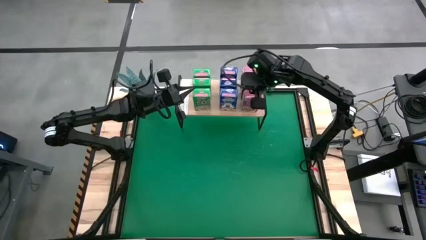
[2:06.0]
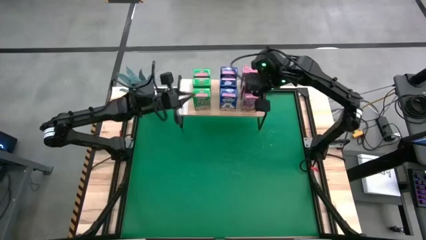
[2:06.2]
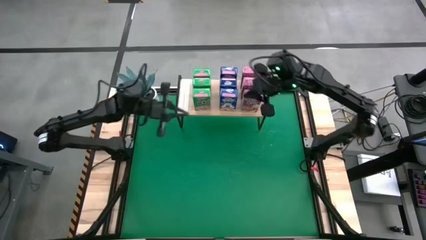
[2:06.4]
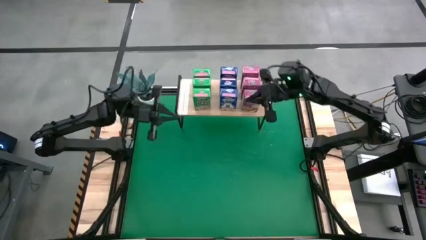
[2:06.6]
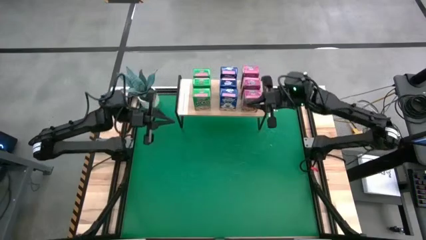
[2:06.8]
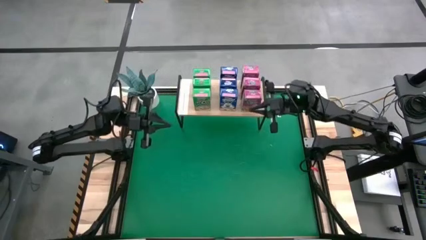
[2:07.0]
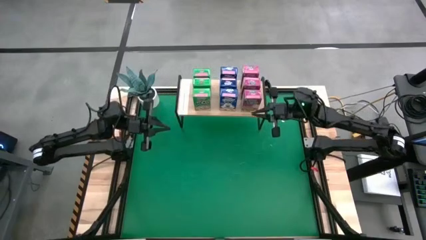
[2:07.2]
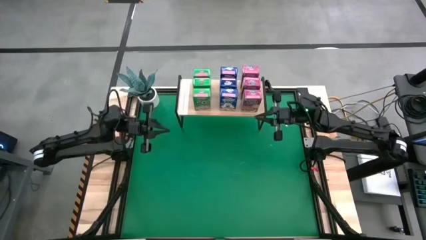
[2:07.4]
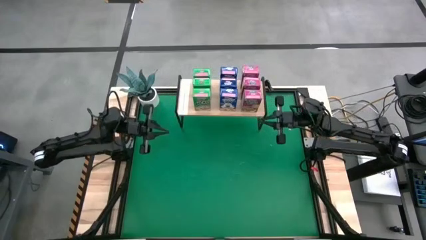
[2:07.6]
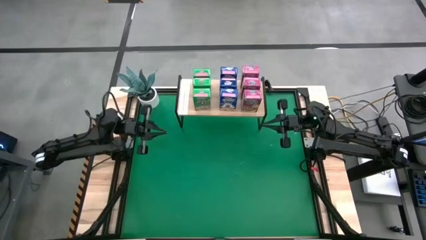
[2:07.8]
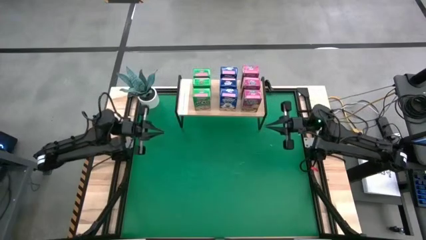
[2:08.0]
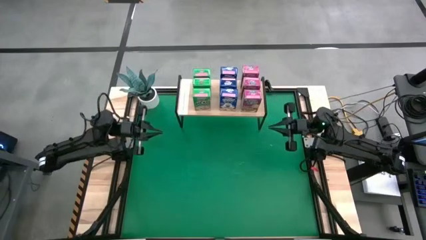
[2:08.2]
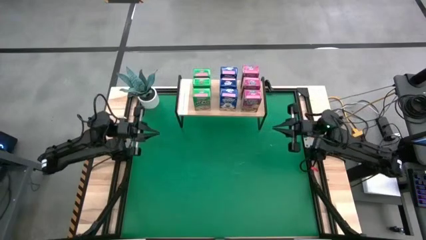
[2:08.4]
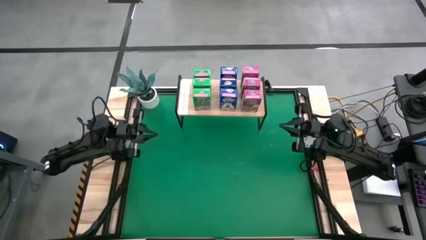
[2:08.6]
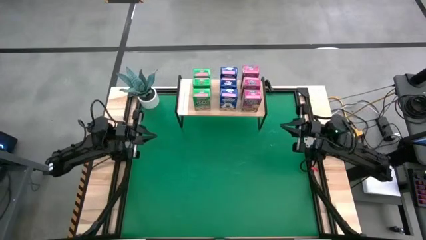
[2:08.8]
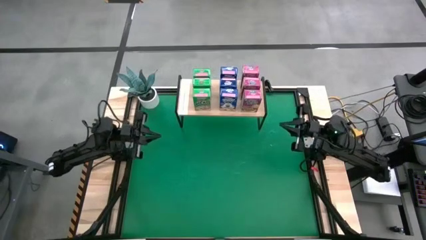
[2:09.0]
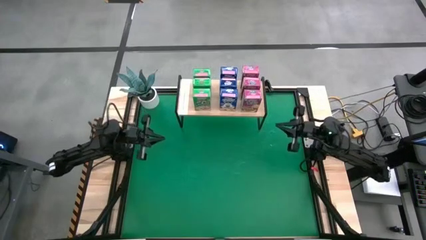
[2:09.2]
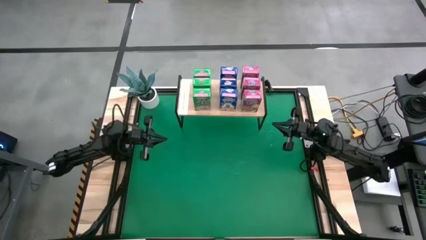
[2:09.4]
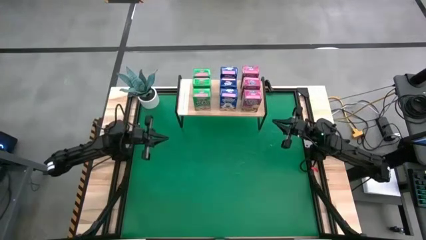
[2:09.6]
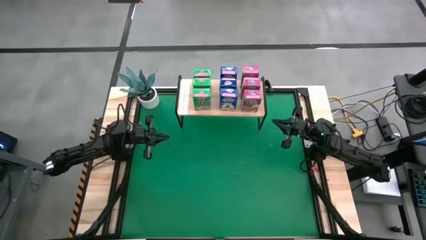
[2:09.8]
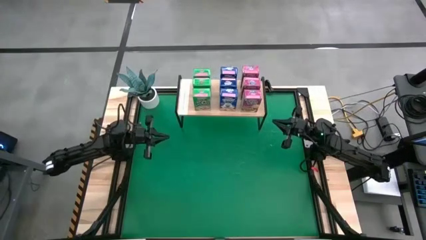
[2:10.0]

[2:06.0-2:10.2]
Task: Stack cereal on shelf
Return to Home Position

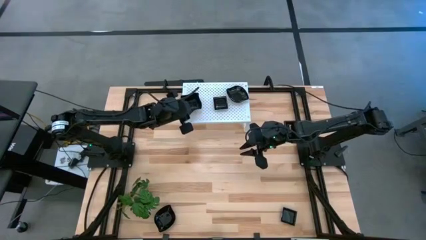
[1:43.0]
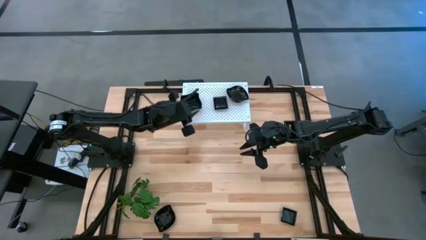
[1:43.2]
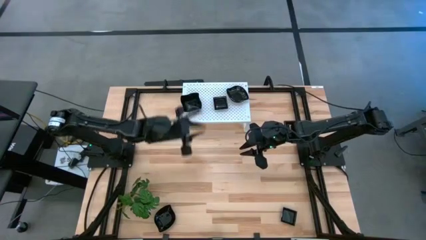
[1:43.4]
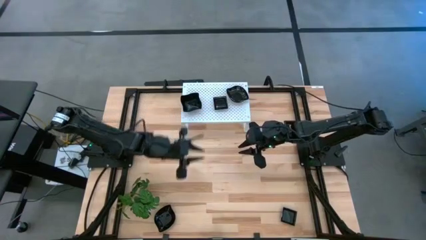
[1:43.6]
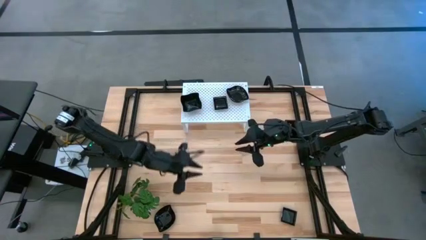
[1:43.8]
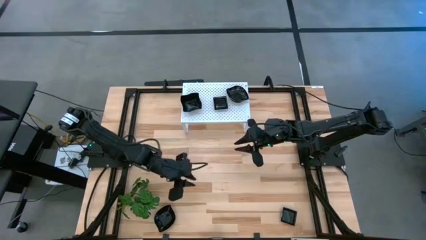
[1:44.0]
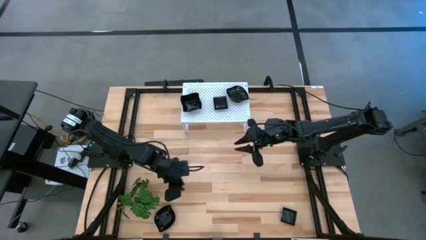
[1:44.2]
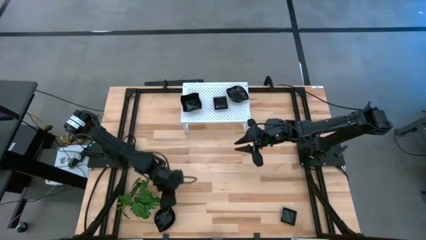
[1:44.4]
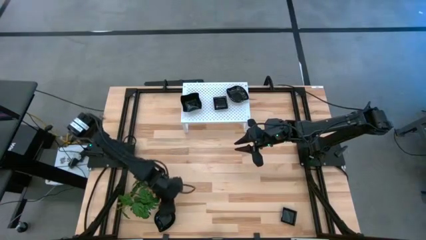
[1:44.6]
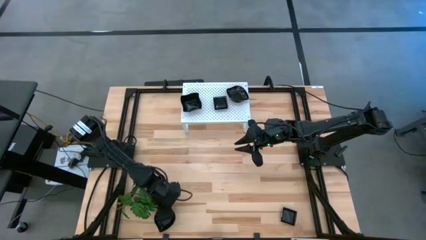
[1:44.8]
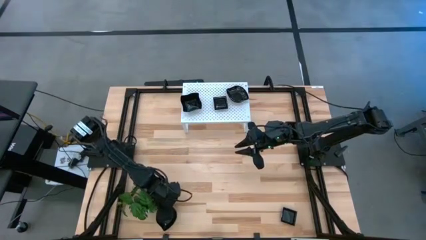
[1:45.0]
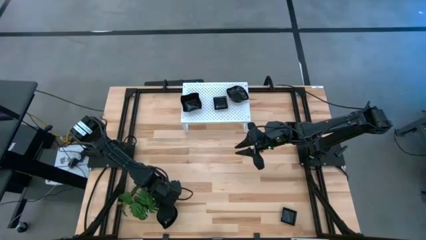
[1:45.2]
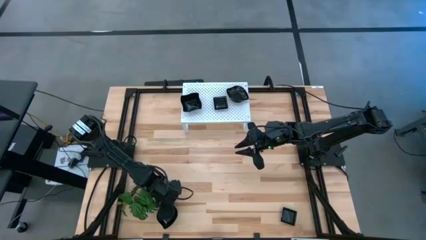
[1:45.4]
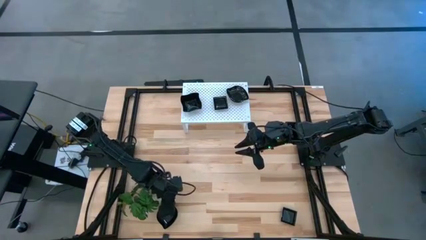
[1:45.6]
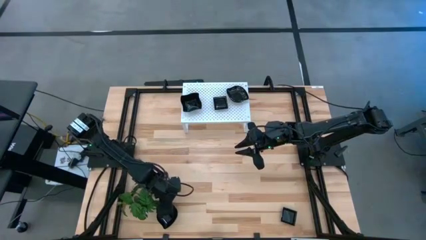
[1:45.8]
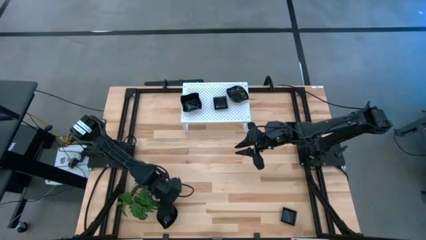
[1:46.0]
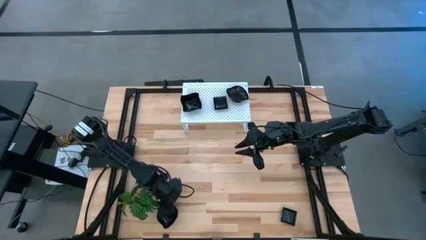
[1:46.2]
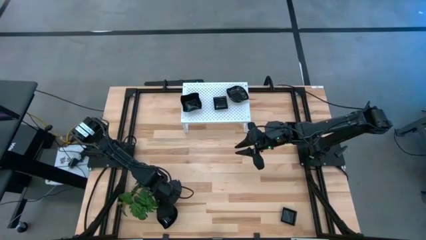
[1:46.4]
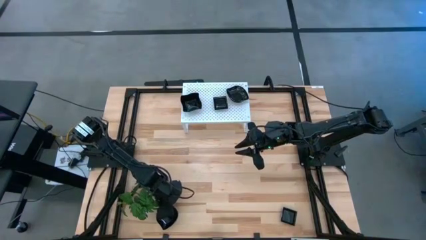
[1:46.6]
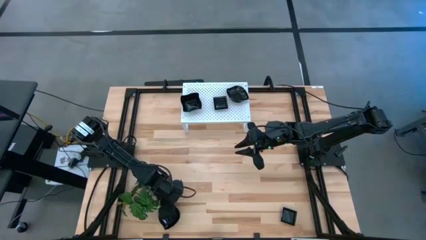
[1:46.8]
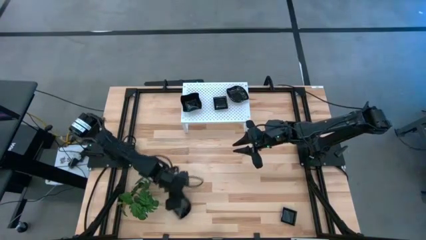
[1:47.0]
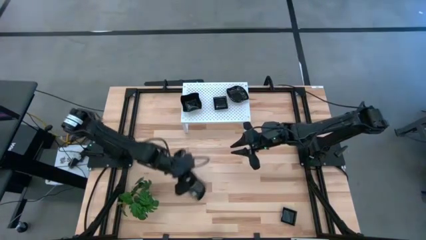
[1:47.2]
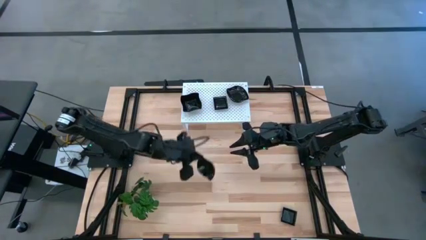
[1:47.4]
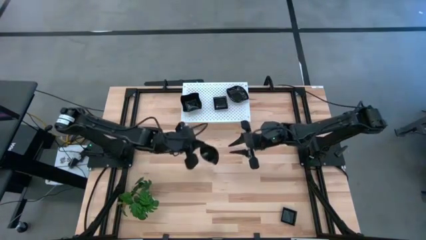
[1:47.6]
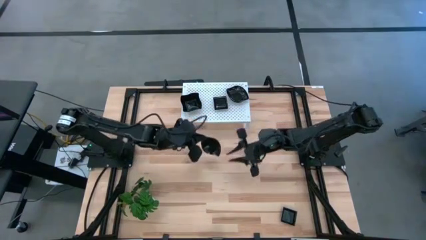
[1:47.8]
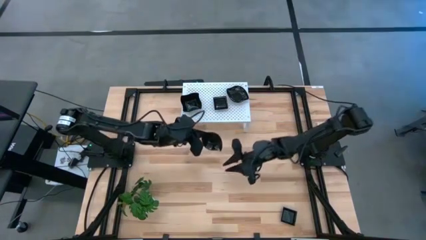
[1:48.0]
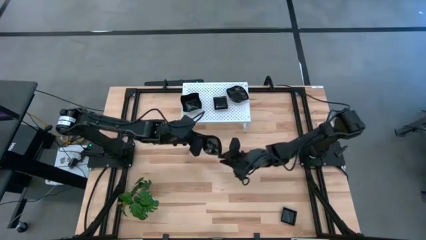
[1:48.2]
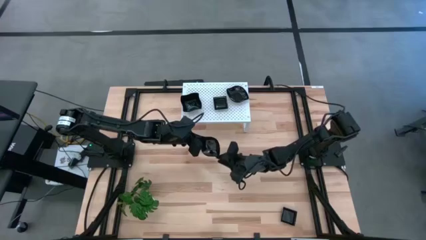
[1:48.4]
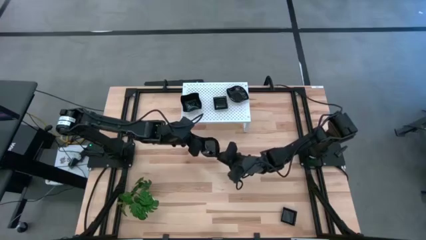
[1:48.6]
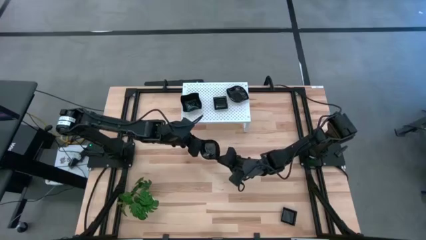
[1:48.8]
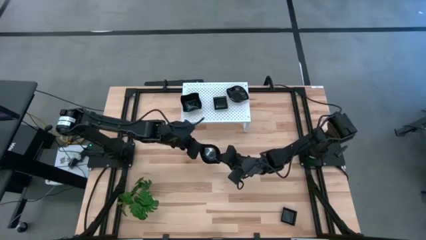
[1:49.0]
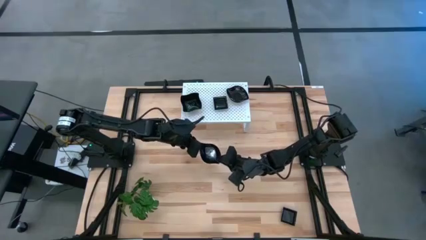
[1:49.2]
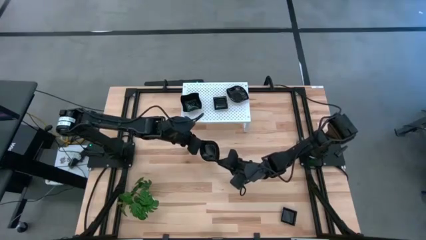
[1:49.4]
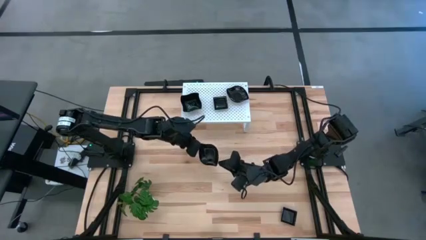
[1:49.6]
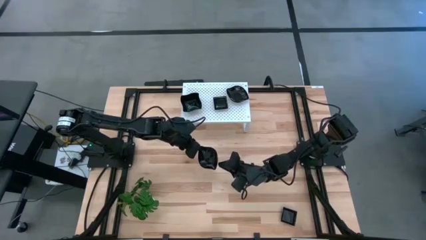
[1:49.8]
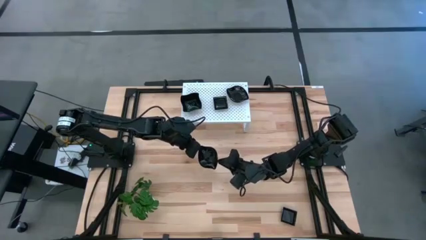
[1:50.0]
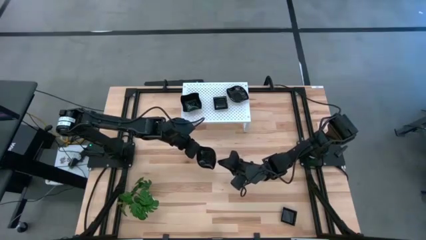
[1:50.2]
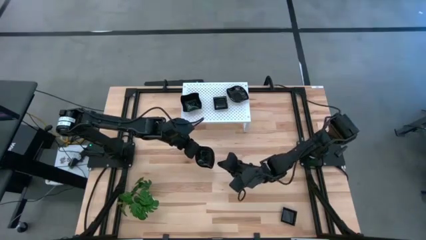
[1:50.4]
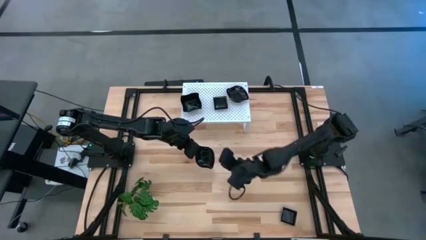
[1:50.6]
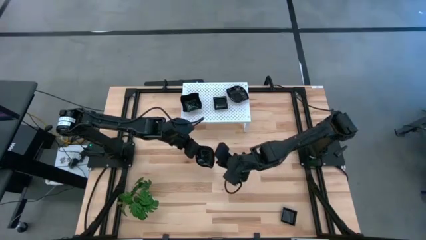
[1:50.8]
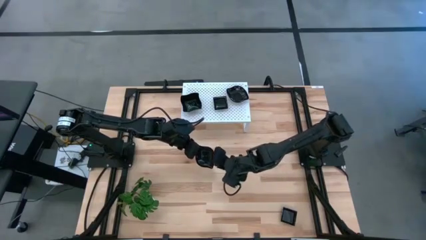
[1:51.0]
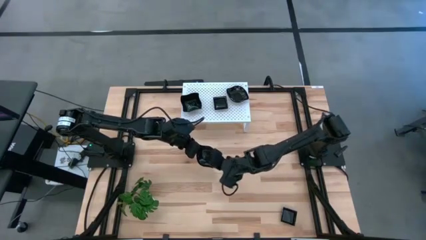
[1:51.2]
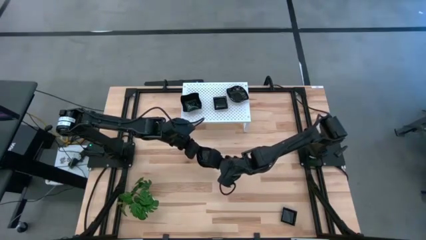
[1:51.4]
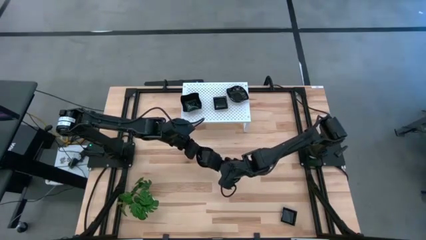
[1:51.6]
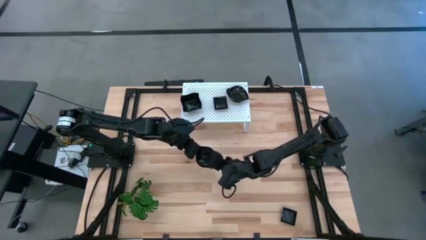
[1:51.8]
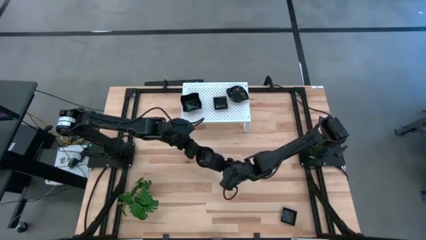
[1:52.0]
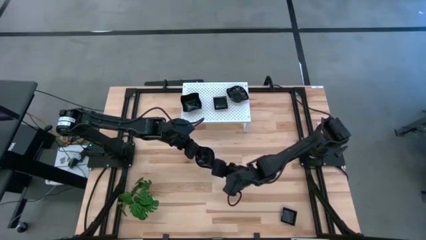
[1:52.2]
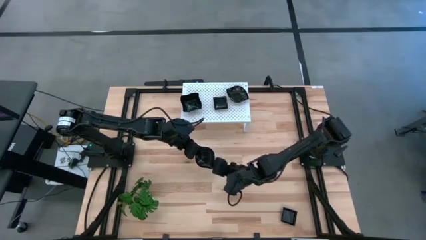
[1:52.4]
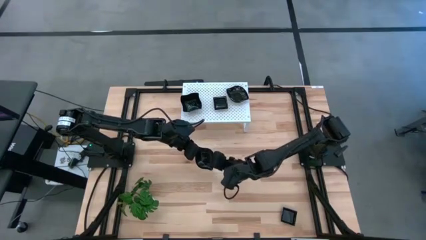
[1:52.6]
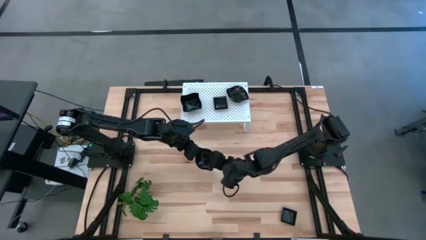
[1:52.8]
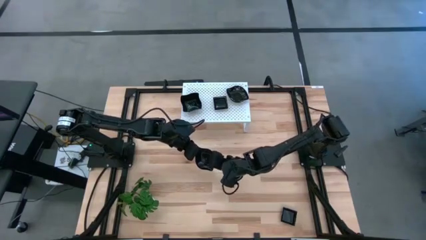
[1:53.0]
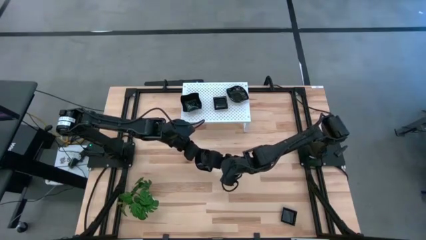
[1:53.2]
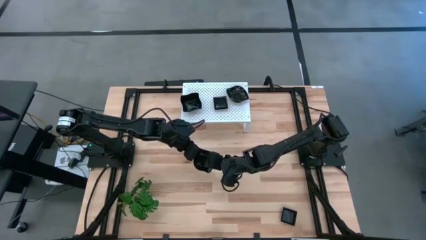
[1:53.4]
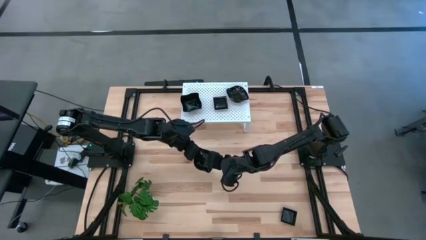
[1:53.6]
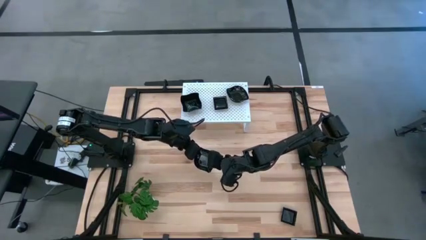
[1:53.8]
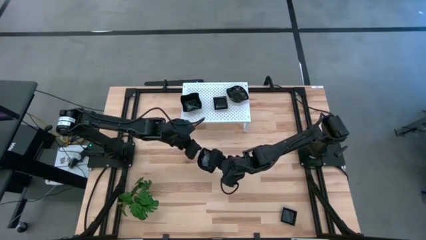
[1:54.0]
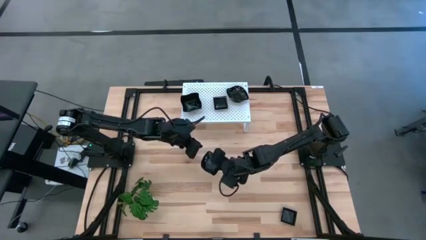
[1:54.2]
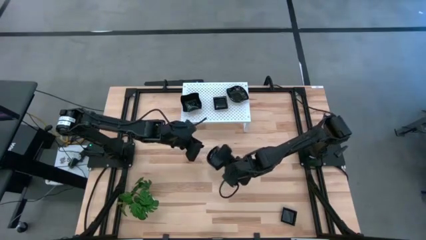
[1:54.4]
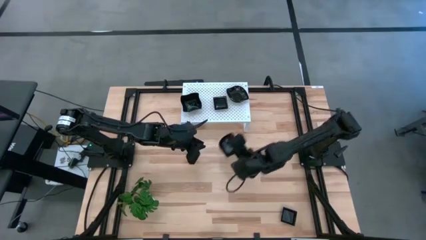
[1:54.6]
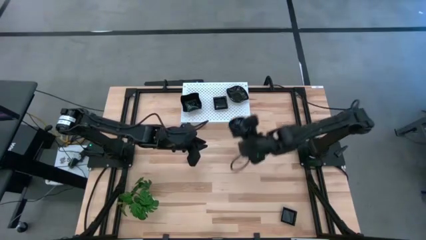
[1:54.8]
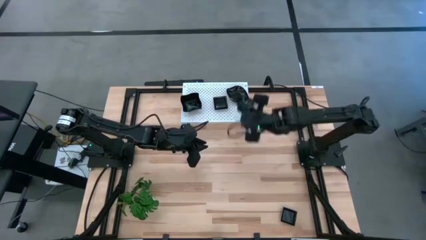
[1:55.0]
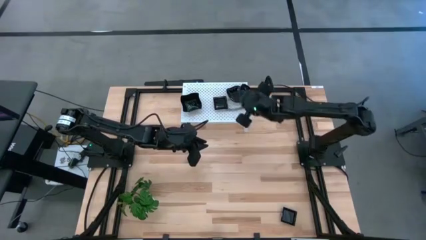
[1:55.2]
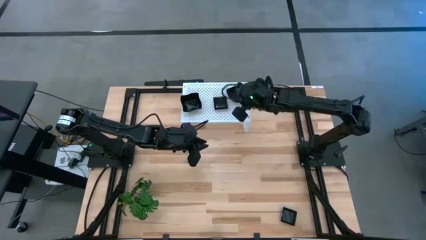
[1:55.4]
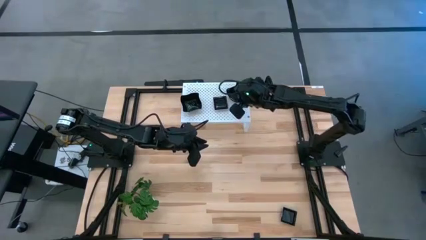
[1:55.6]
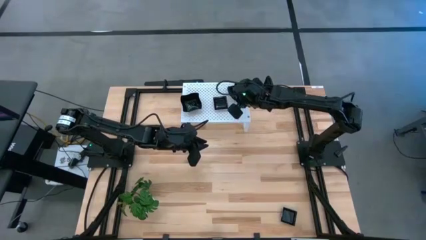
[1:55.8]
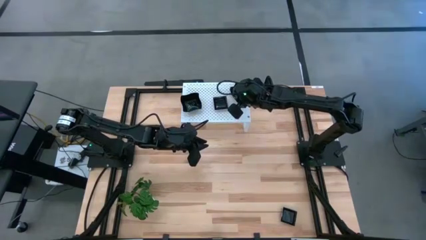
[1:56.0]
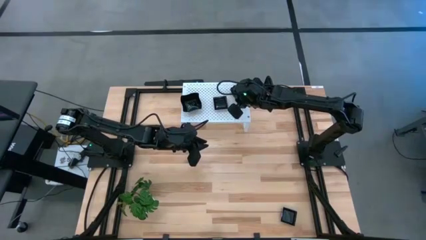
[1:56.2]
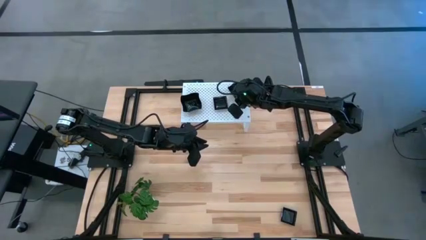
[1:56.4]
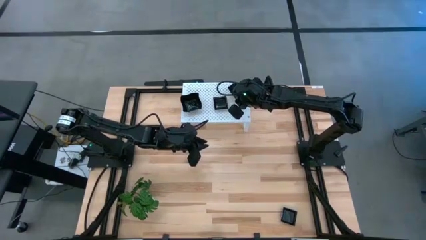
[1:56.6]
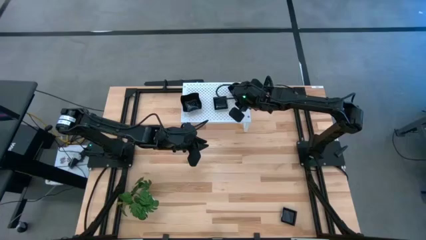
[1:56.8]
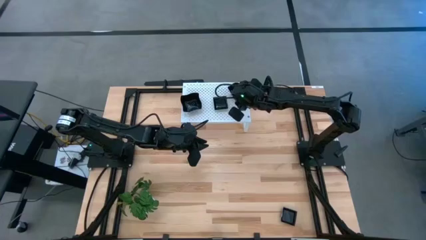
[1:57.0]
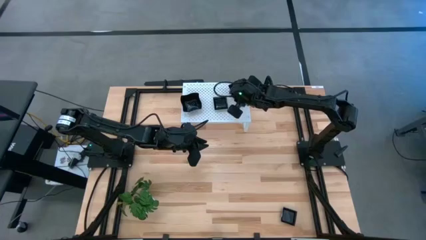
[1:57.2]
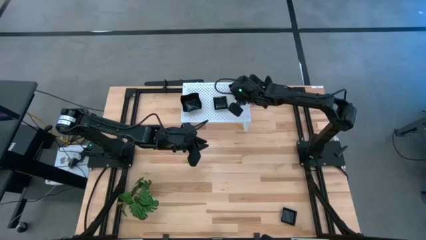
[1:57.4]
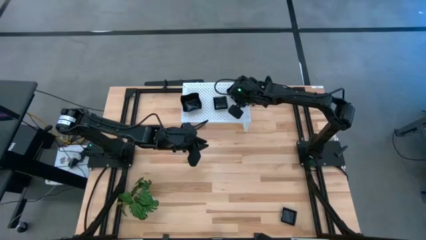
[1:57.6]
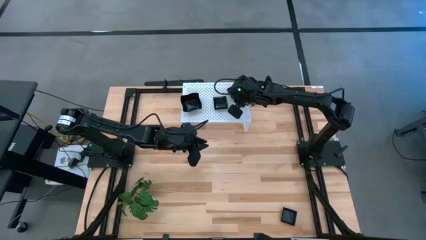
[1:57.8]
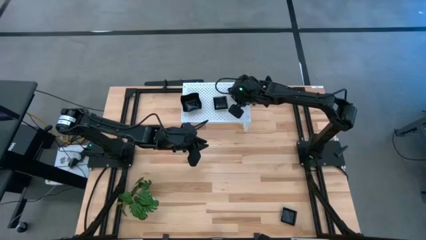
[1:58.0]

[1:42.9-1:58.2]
Task: Pick & Place Mini shaped plates
Stack the leaf shaped plate on top of the other leaf shaped plates on the shelf
